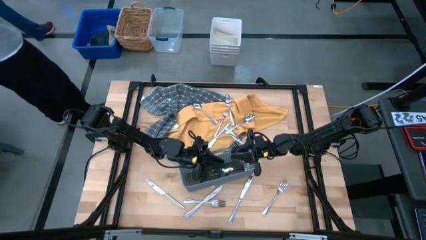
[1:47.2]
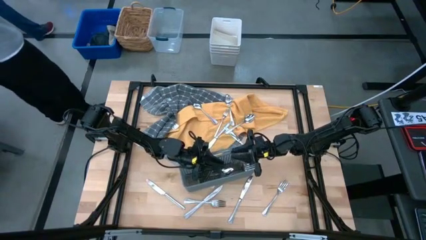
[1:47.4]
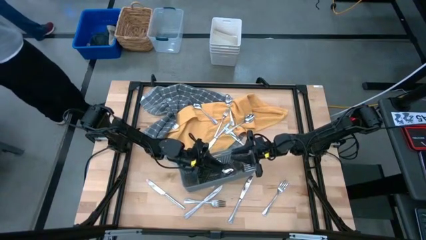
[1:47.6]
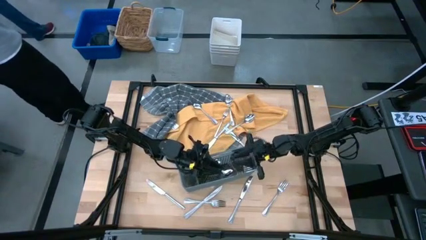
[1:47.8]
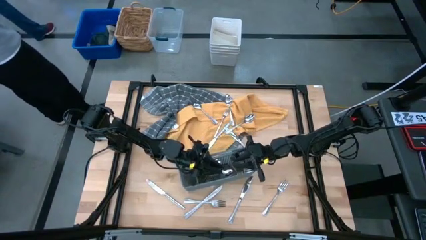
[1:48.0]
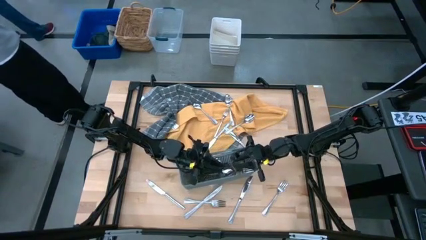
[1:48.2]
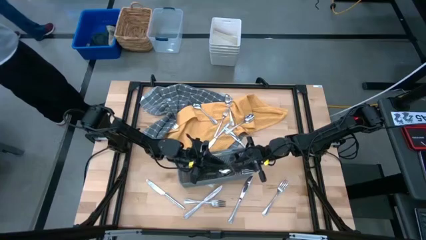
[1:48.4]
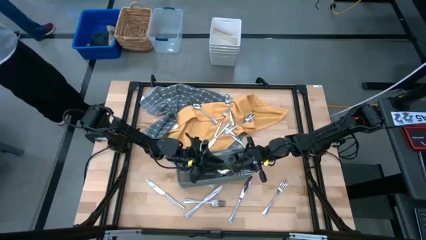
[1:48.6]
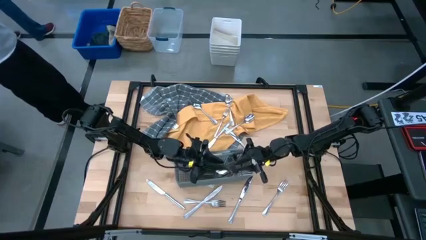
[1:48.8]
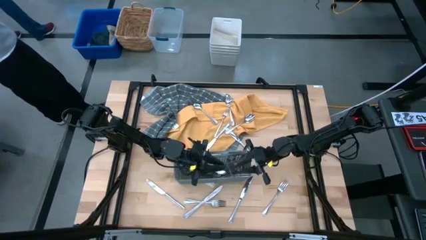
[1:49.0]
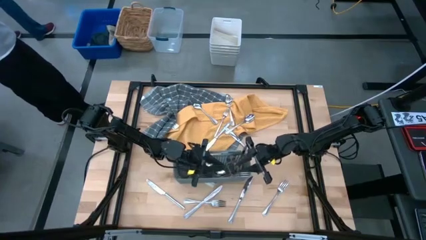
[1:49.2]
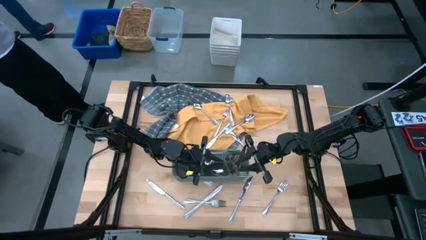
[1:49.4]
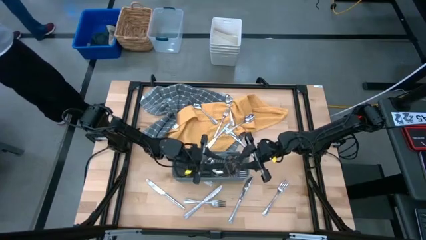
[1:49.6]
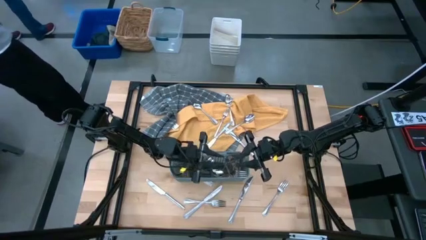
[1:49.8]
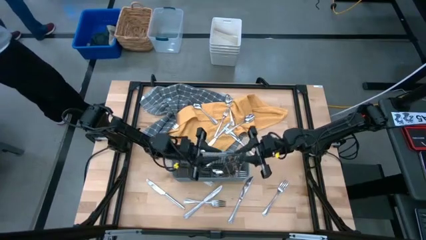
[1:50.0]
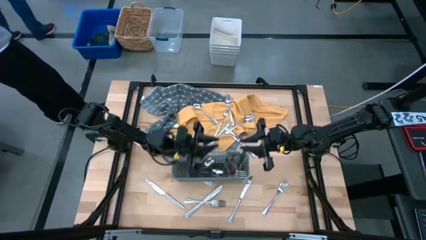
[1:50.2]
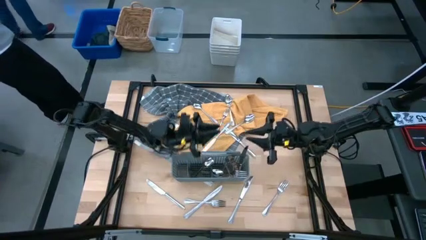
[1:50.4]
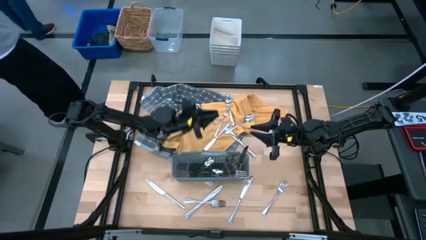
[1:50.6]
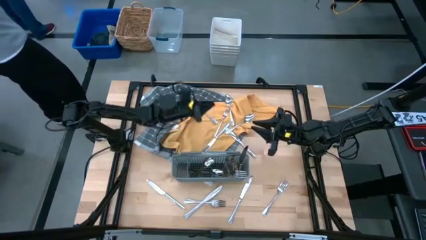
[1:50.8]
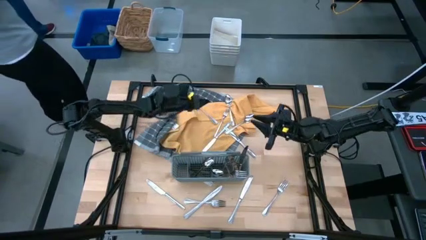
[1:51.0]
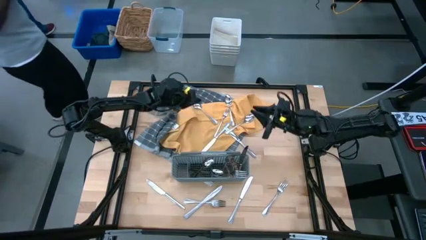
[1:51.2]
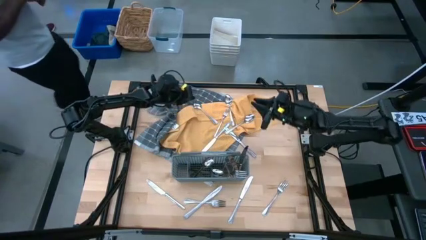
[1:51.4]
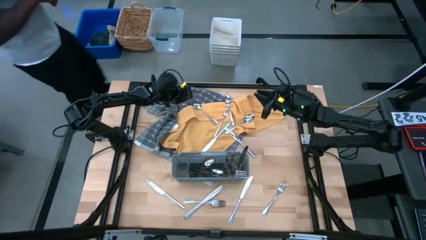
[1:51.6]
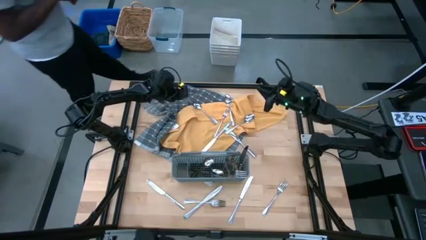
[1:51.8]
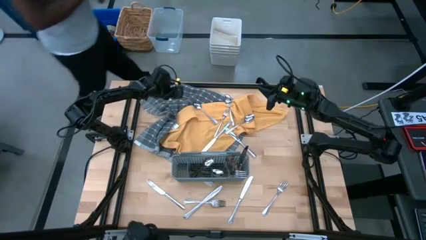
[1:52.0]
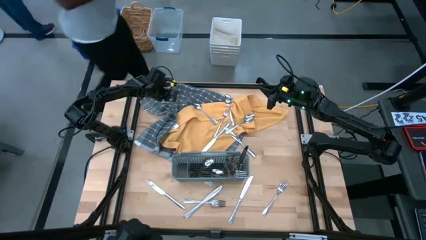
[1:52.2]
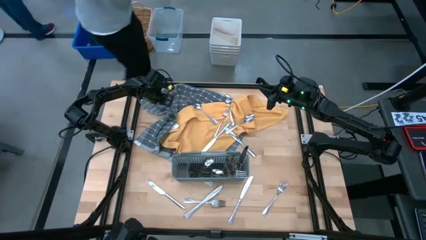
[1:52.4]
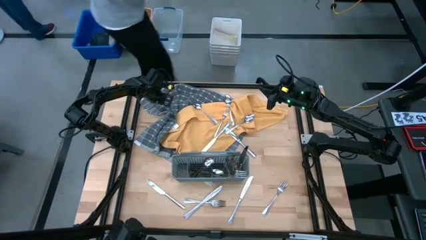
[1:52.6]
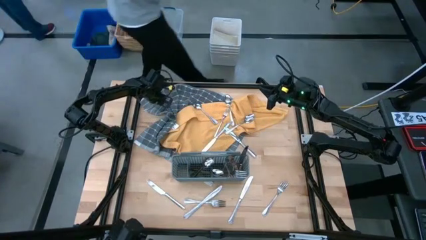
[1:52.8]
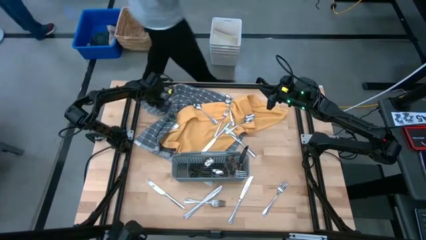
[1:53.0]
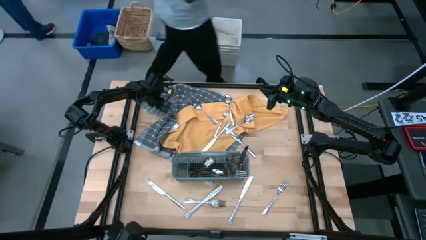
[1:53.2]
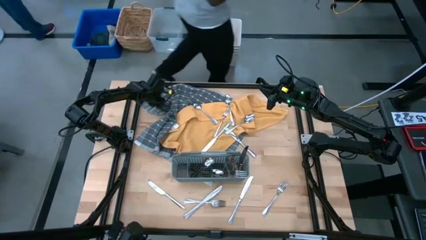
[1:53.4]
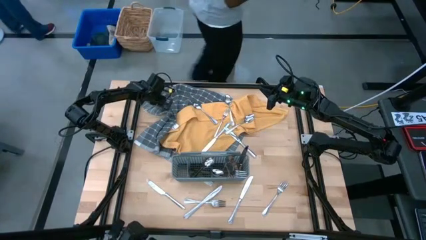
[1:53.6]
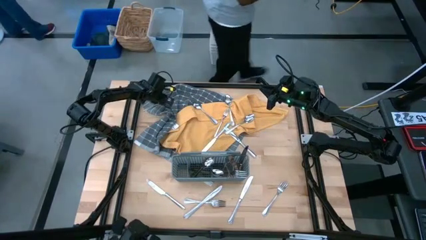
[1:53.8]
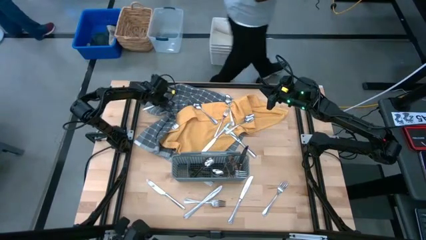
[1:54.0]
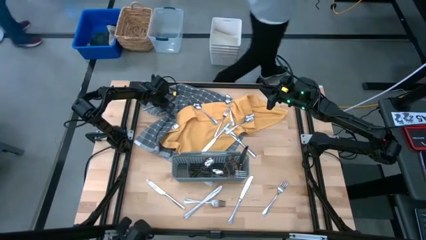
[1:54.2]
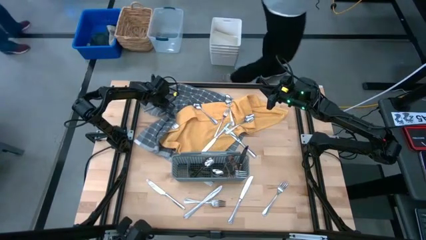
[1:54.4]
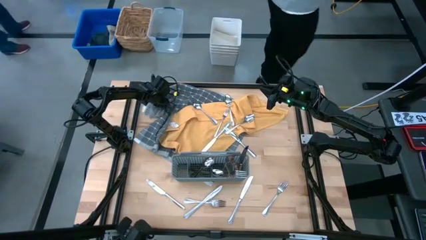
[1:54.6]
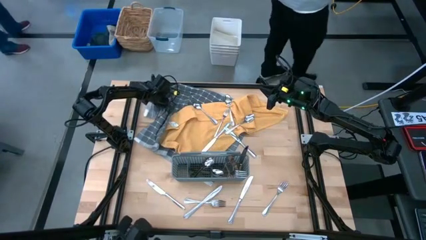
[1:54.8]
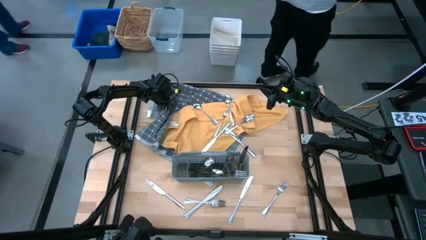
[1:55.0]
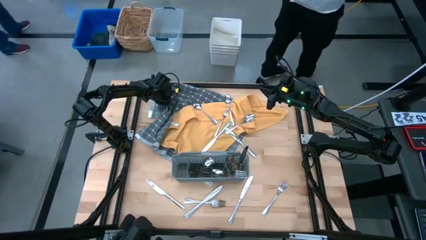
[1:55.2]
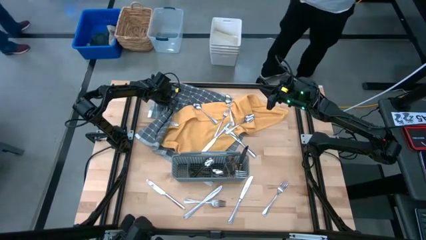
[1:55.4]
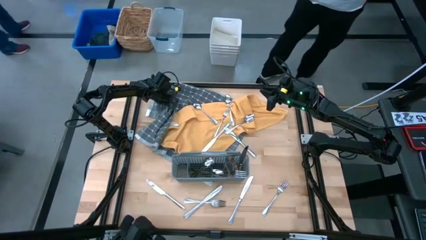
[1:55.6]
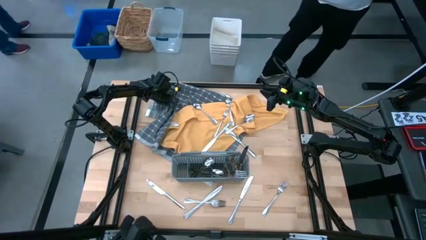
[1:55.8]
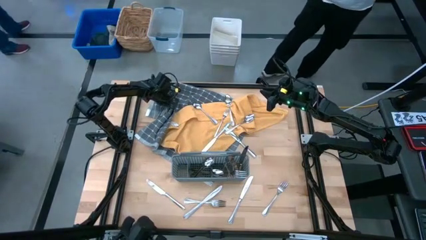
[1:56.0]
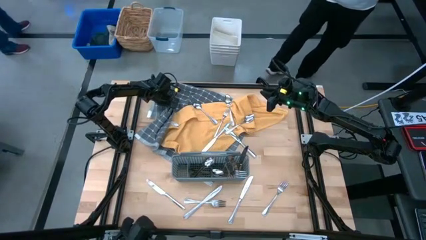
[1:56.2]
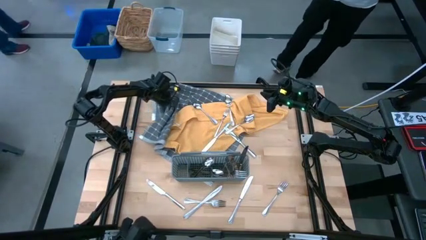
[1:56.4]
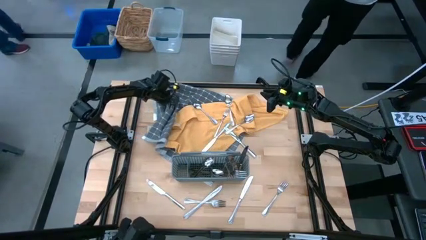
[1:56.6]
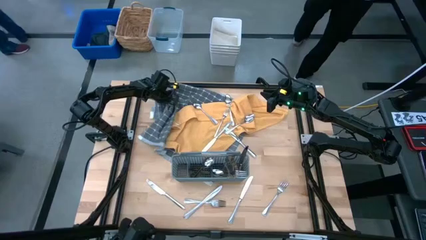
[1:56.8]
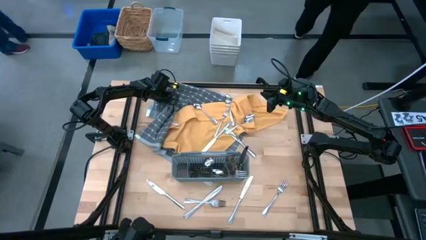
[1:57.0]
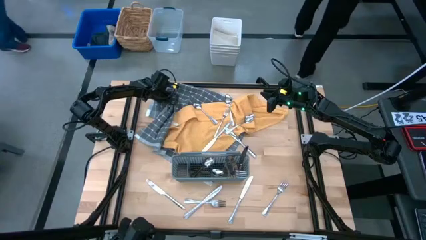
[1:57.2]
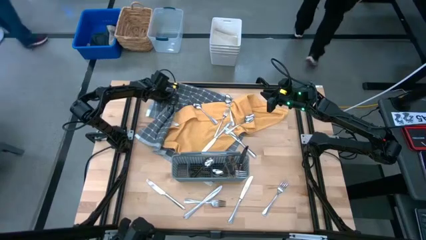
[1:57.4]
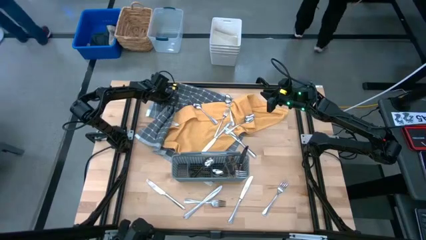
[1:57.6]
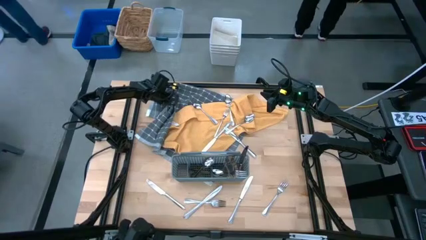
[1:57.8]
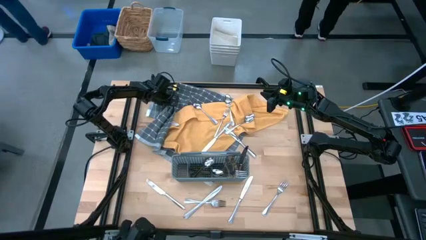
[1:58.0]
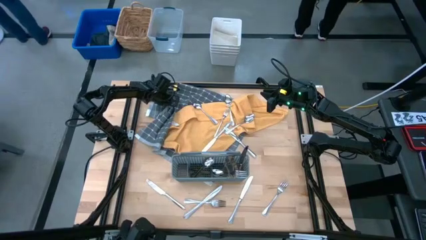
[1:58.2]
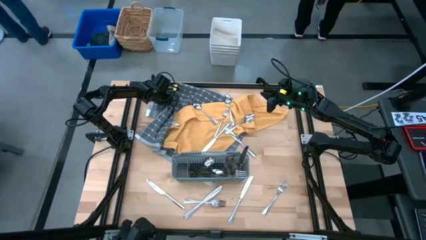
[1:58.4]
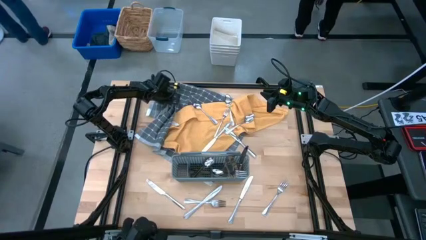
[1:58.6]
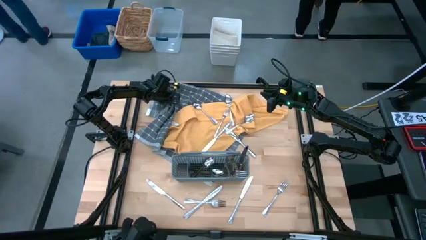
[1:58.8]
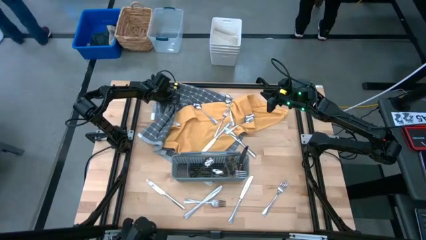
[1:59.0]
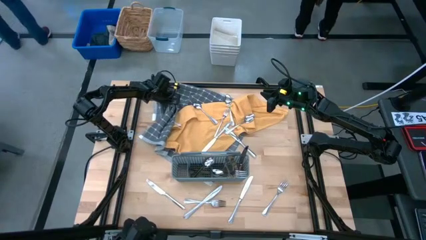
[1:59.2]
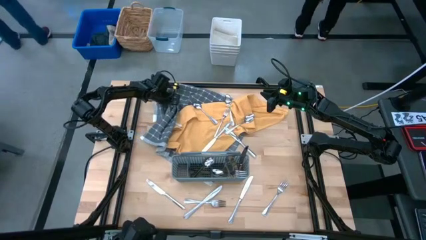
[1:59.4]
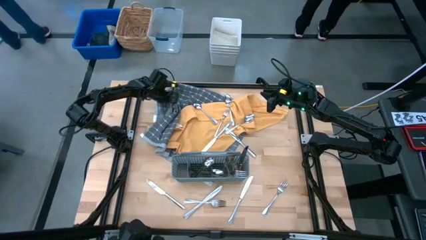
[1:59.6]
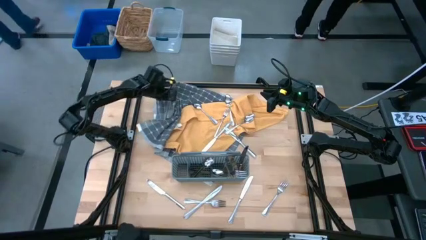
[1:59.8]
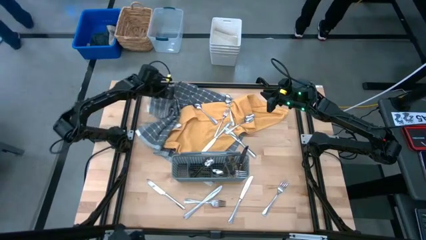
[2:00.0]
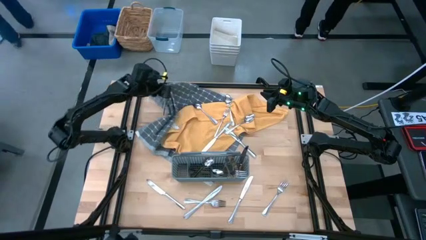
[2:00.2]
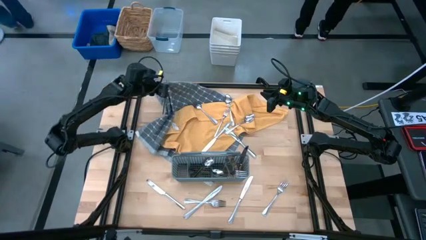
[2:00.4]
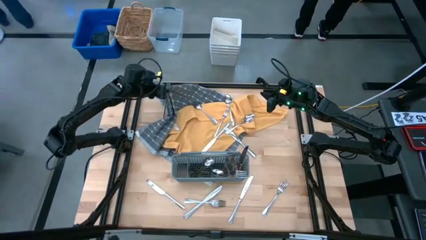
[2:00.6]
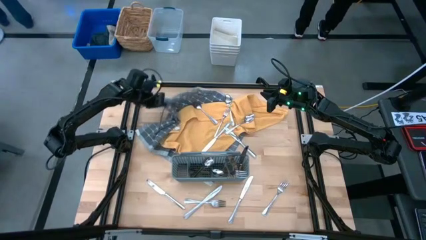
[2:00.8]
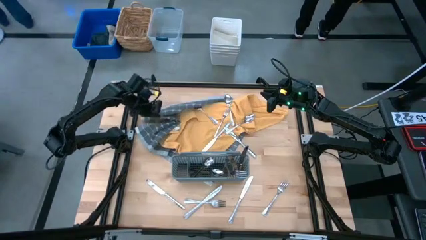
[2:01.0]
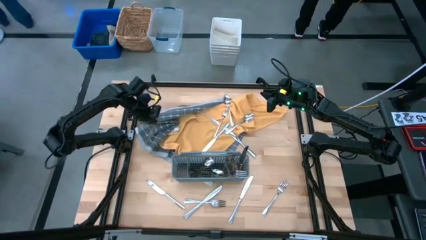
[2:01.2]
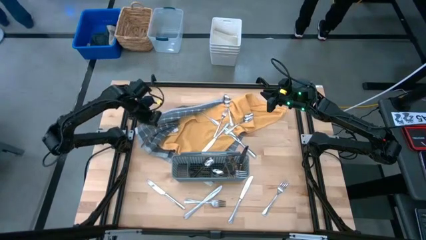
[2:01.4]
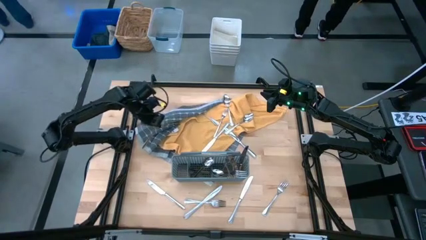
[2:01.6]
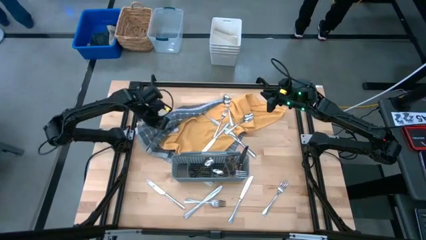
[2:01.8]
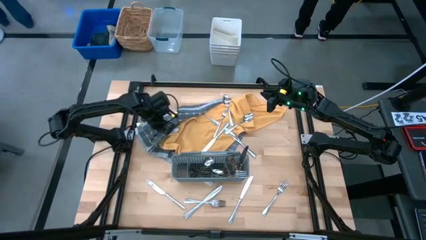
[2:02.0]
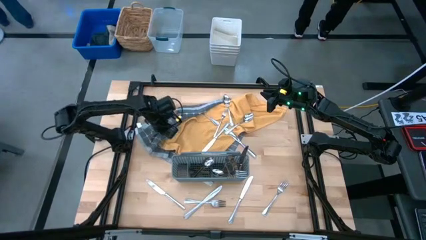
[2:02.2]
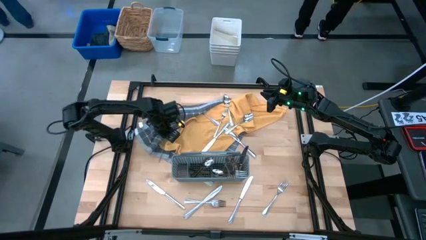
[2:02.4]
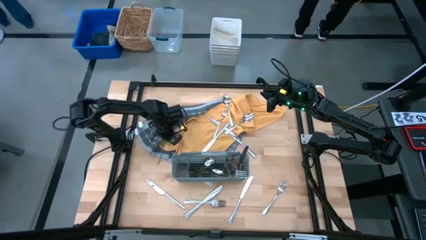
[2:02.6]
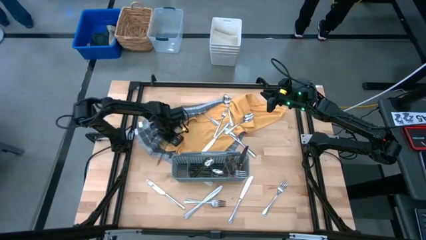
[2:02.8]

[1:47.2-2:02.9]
Task: Sort silverware
Put the silver fork into the gray silverware basket
